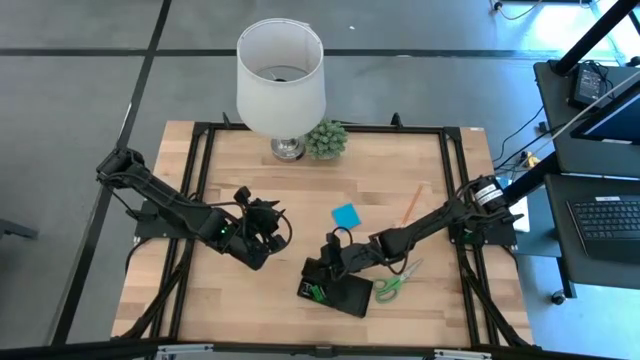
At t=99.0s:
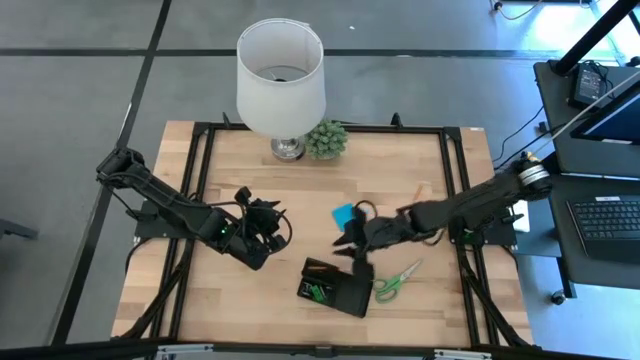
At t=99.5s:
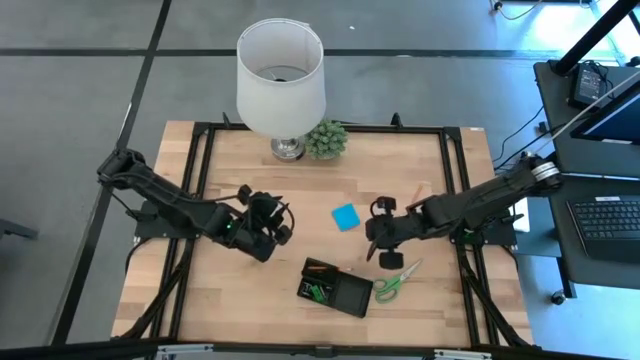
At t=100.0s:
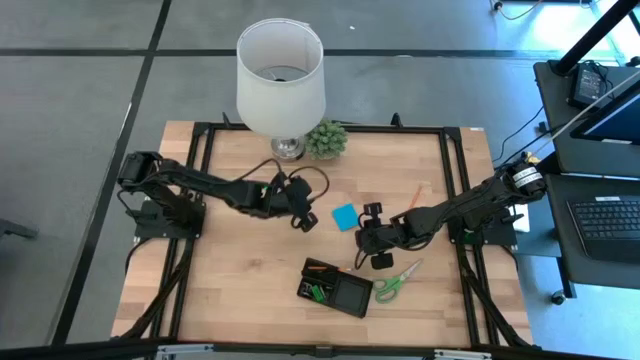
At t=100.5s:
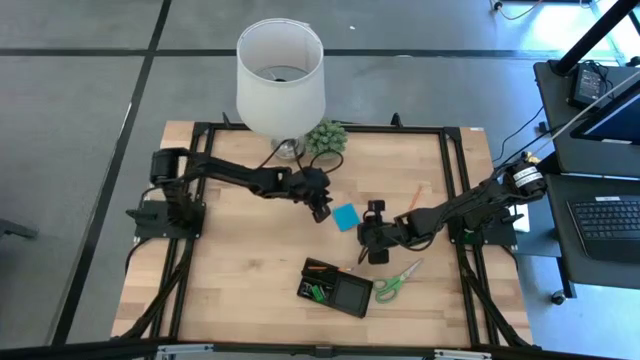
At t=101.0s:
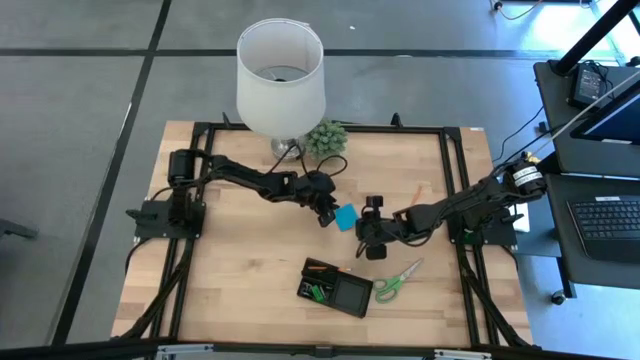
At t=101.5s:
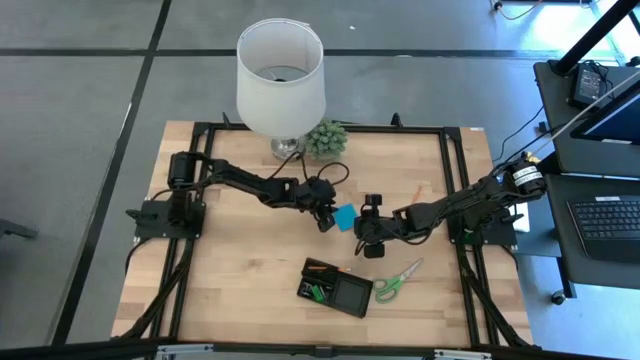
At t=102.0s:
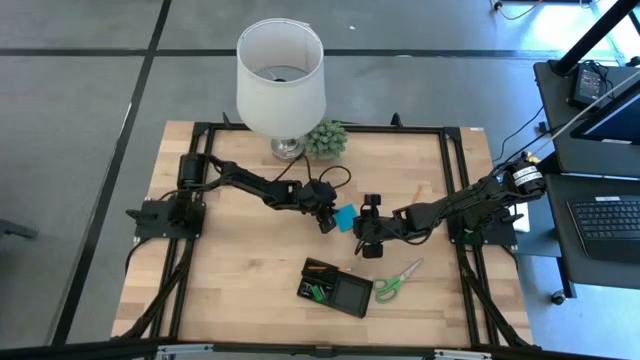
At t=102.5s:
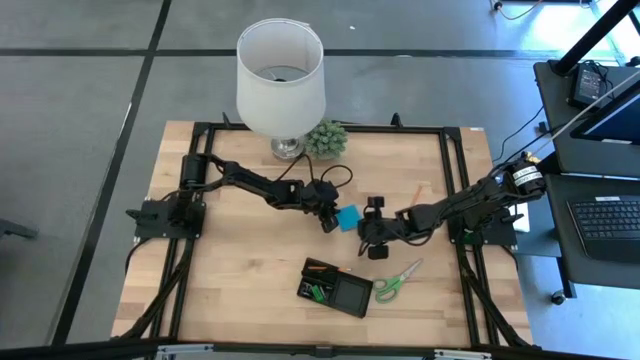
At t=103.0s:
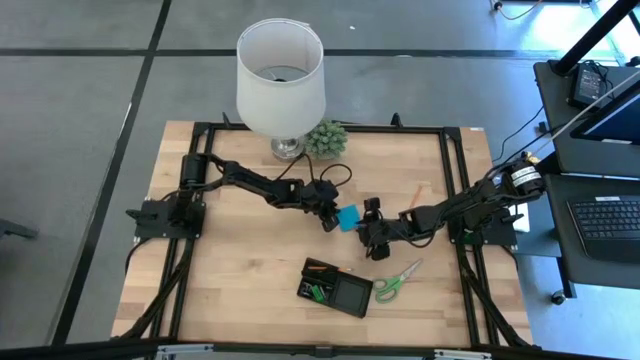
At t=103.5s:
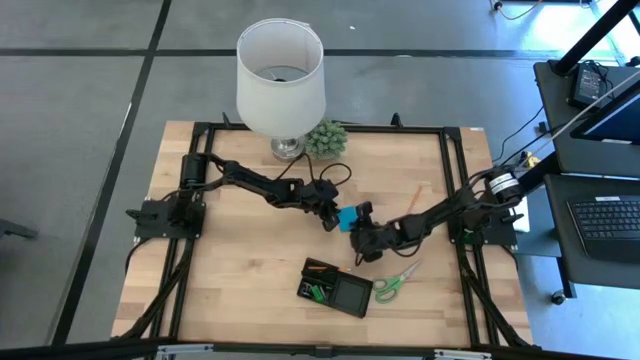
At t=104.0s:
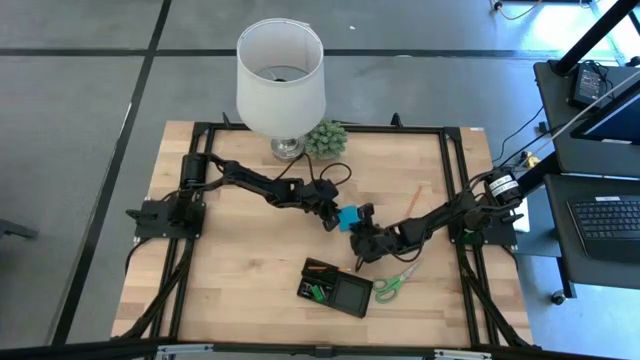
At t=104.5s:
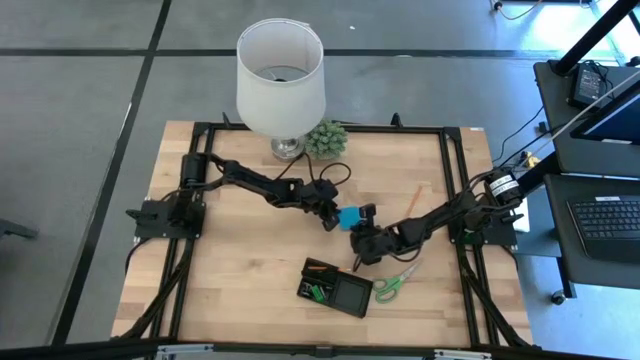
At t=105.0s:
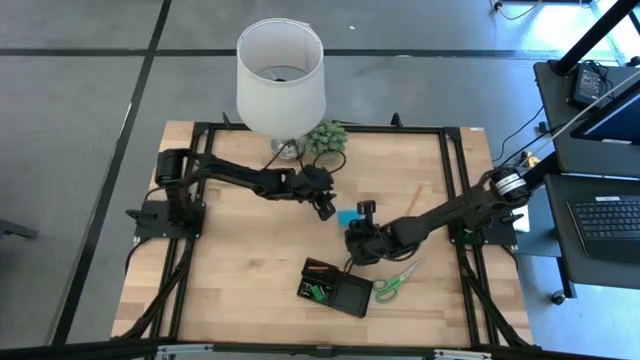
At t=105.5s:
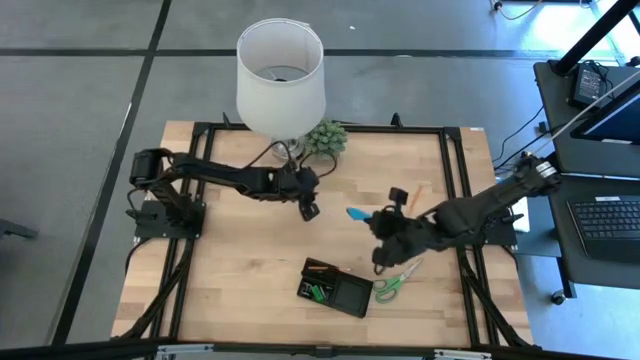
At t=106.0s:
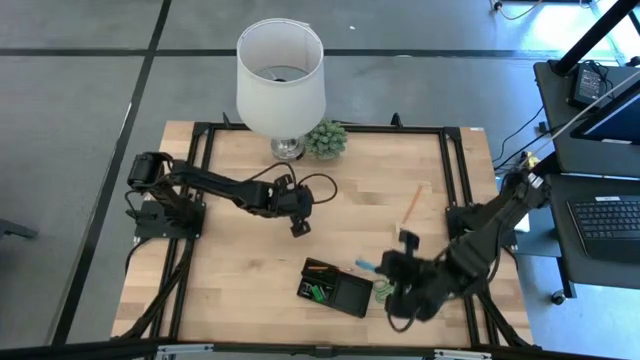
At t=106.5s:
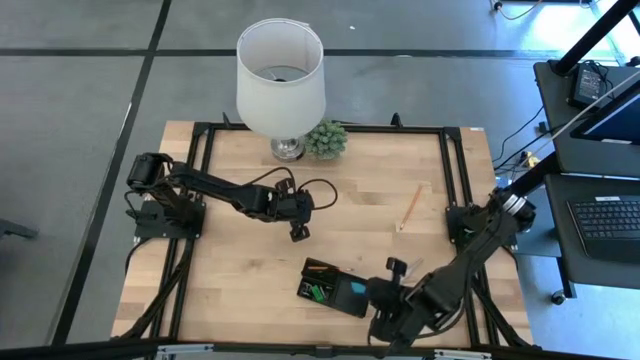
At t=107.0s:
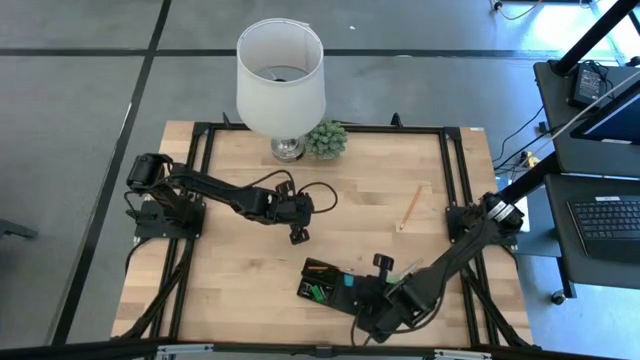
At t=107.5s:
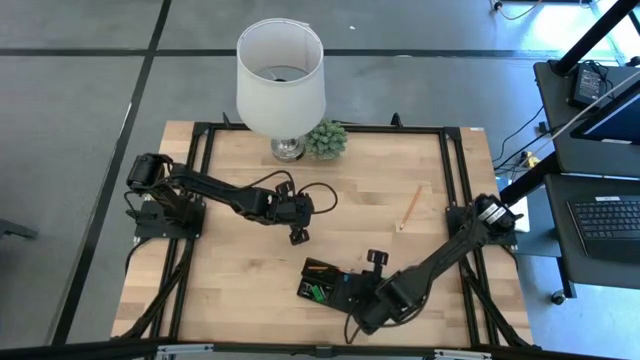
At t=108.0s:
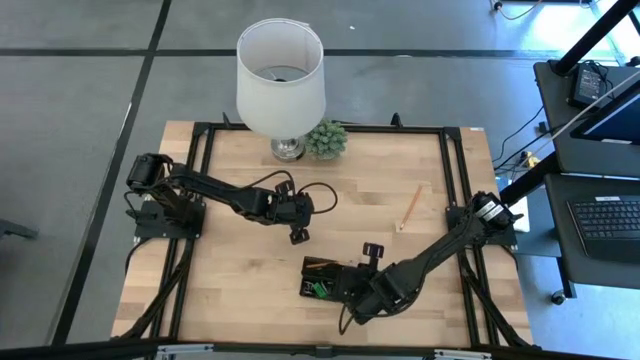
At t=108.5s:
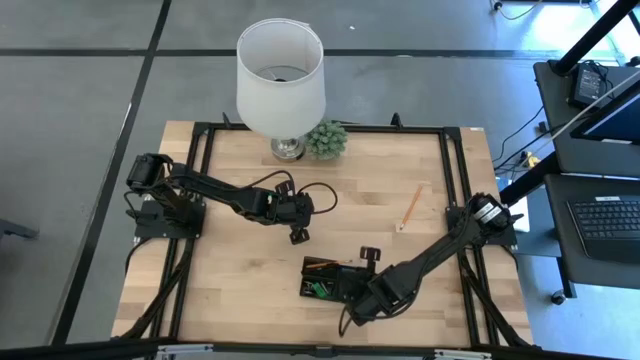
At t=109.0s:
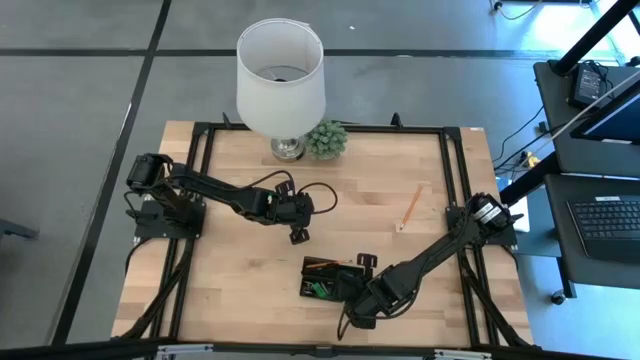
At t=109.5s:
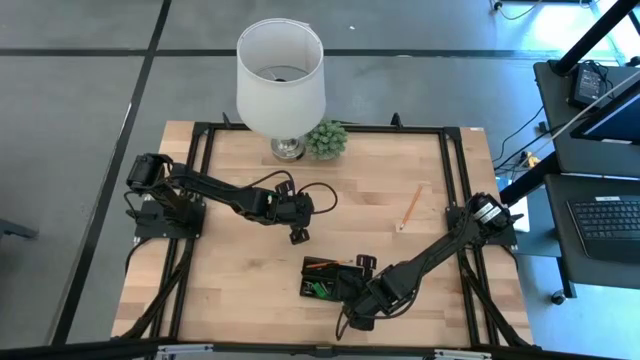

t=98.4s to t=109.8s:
Task: Pick and place office supplies into organizer
Put the blue sticky notes into the desk organizer

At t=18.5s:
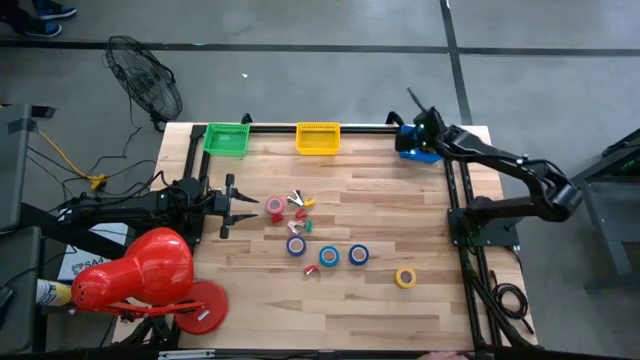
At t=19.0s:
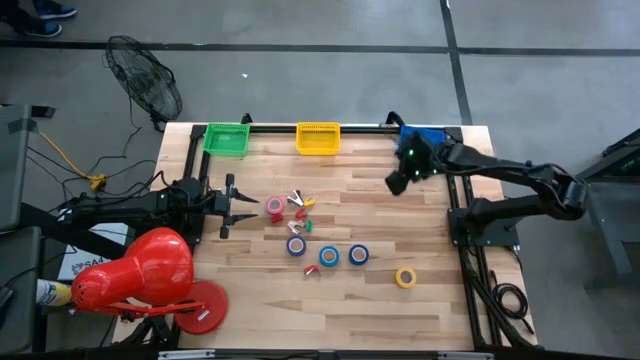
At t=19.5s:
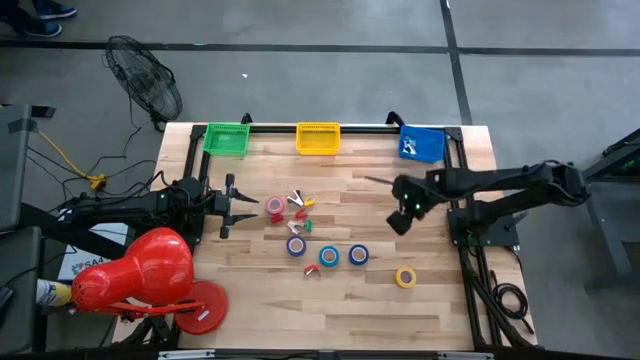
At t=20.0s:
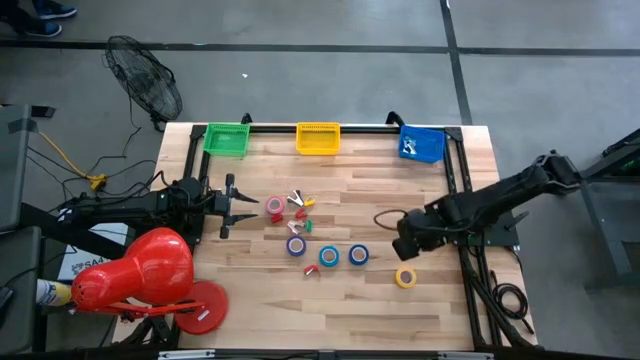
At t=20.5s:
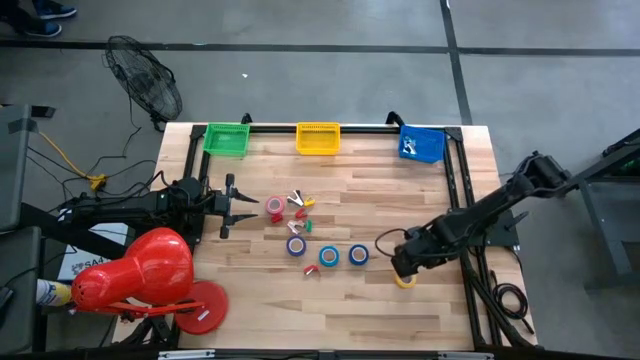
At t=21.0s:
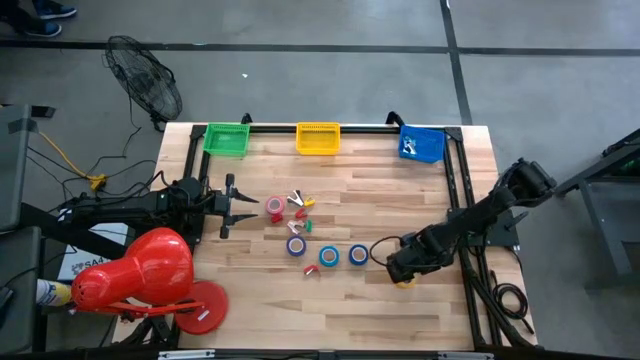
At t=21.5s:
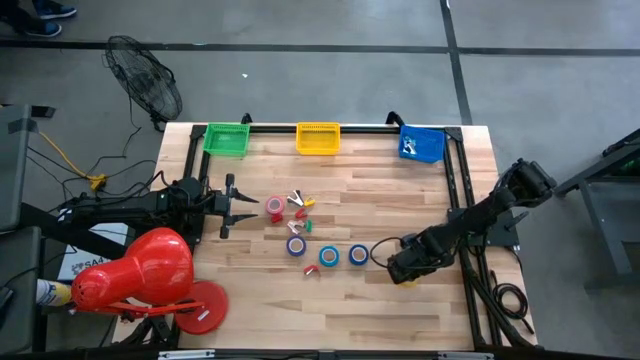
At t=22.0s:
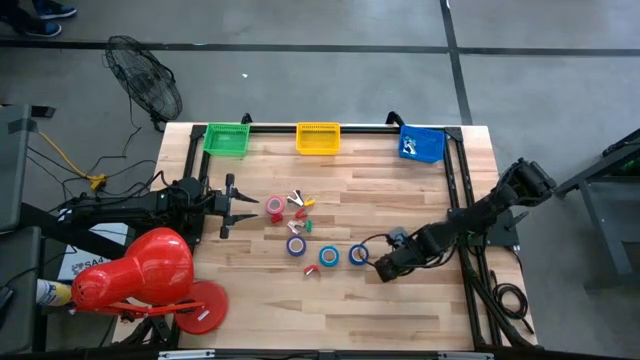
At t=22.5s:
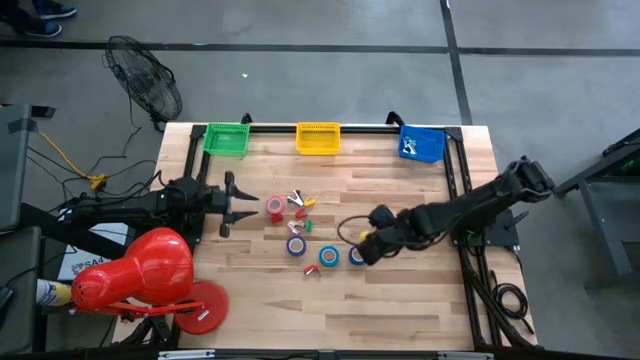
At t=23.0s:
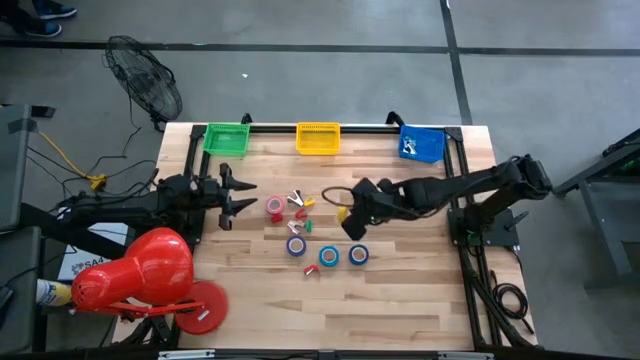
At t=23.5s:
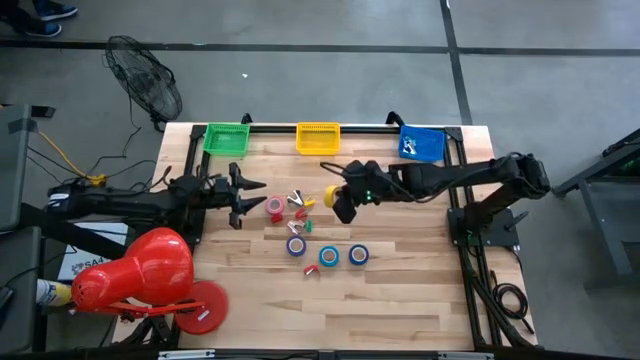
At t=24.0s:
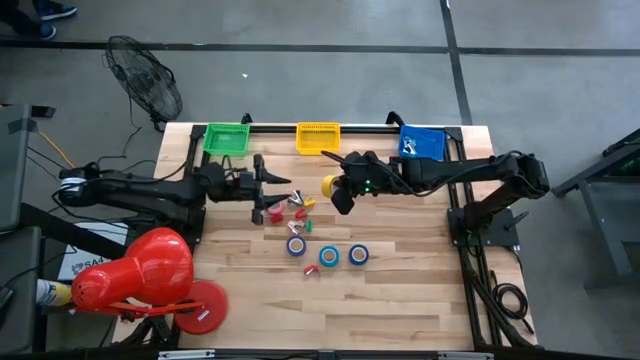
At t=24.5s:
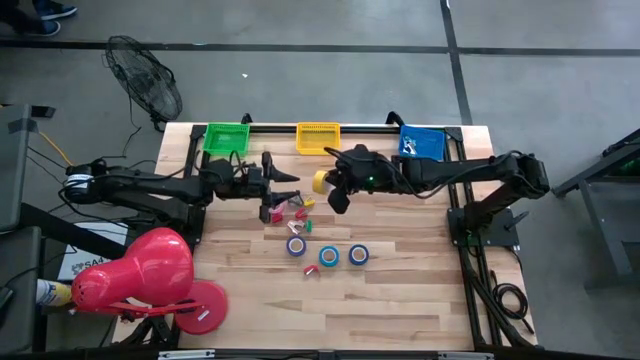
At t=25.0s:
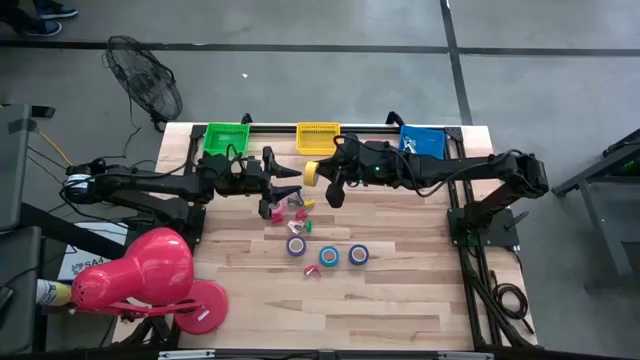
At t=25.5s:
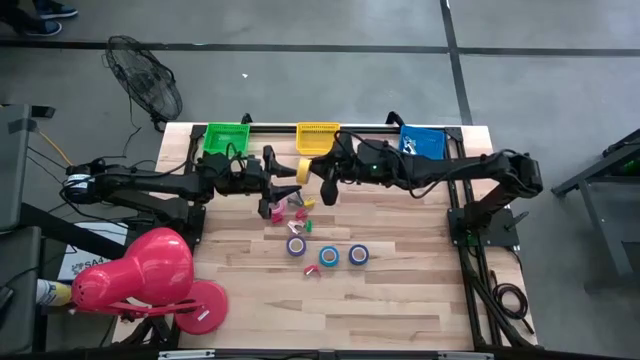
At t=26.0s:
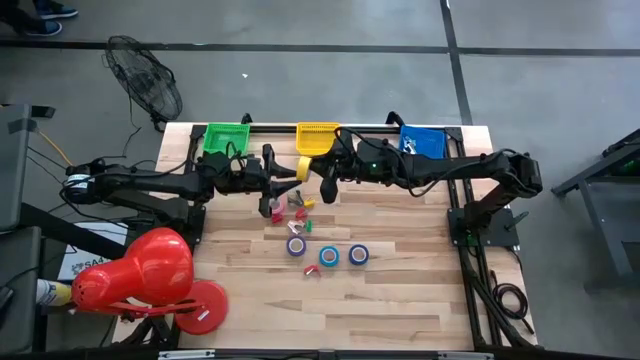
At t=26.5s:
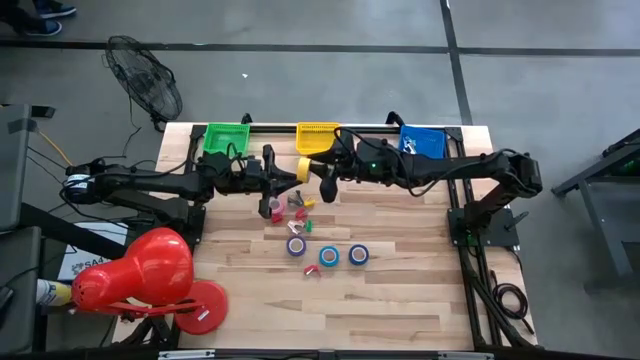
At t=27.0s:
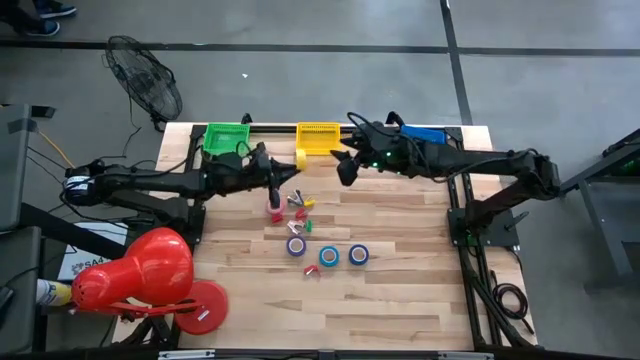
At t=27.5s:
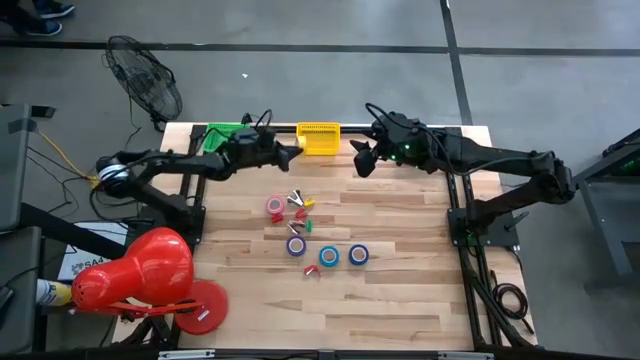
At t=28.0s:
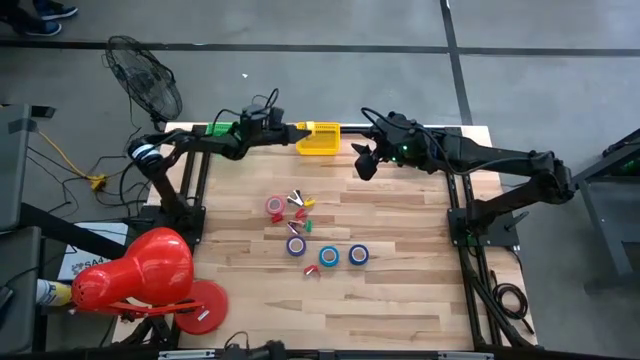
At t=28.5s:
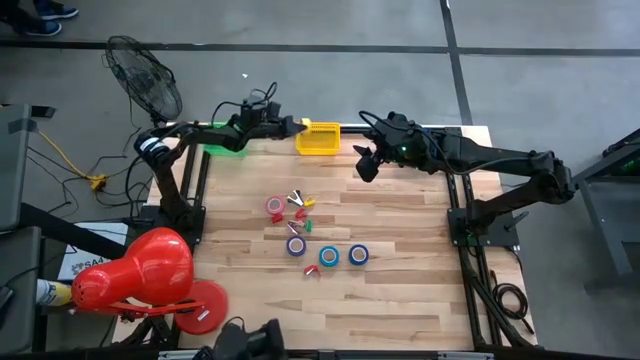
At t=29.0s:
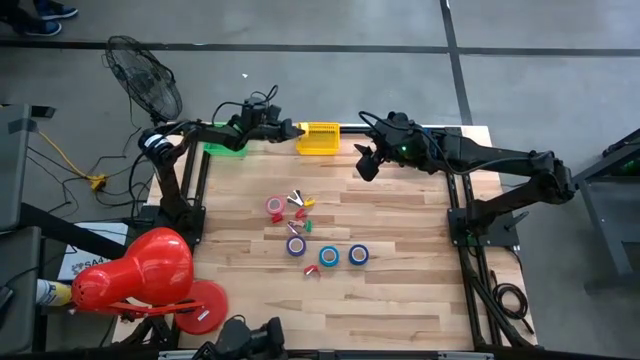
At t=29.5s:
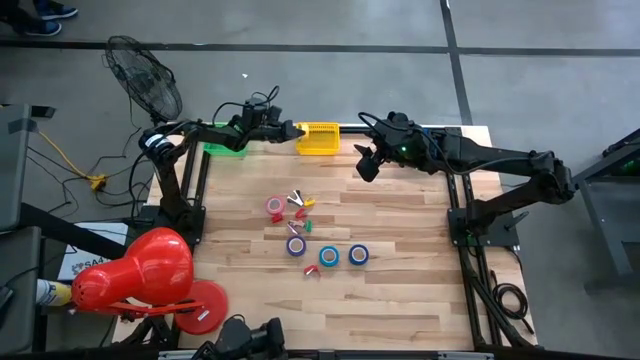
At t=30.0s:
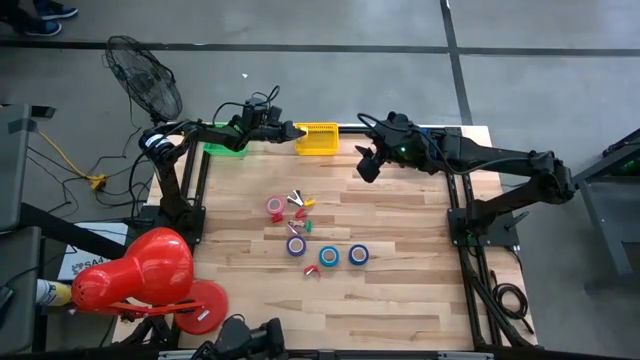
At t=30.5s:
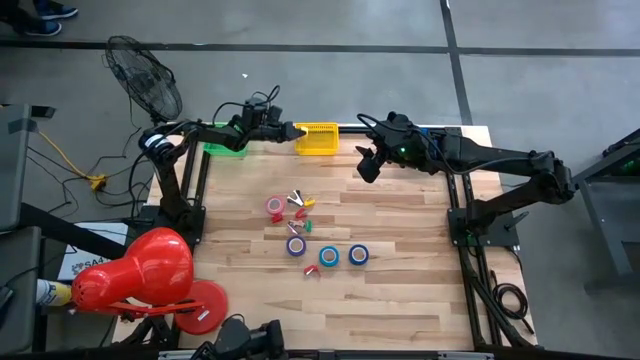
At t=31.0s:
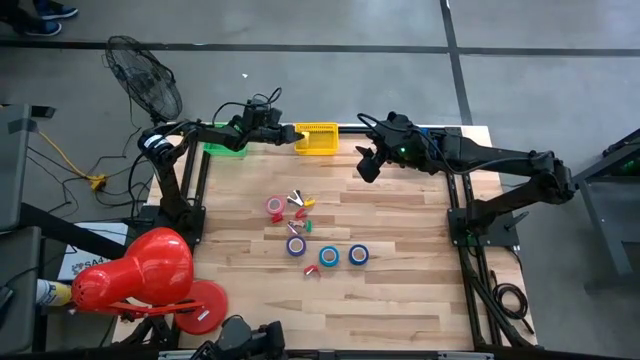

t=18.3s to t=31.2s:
Task: Pick and place Stapler, Stapler remover, tape
Put the yellow tape into the yellow bin
